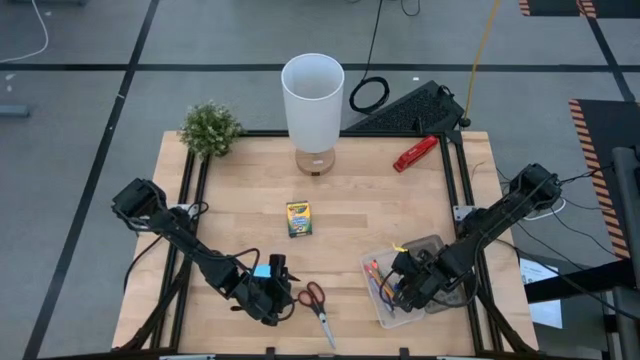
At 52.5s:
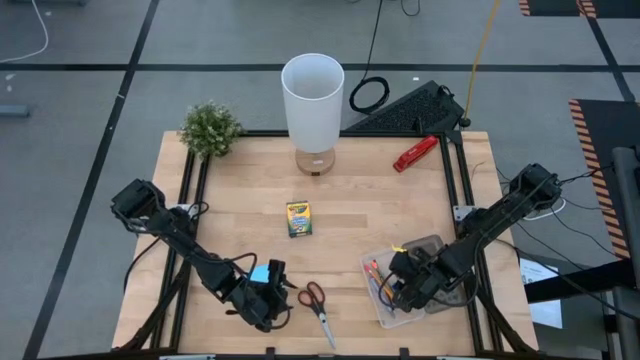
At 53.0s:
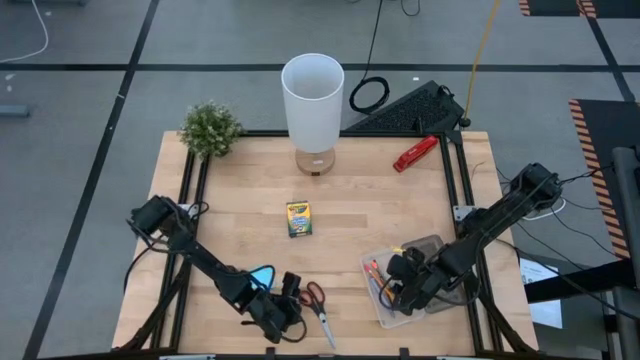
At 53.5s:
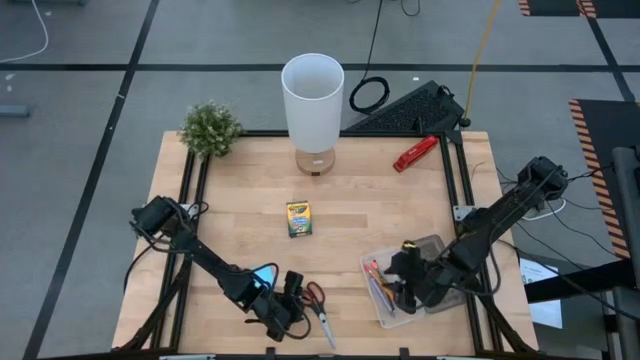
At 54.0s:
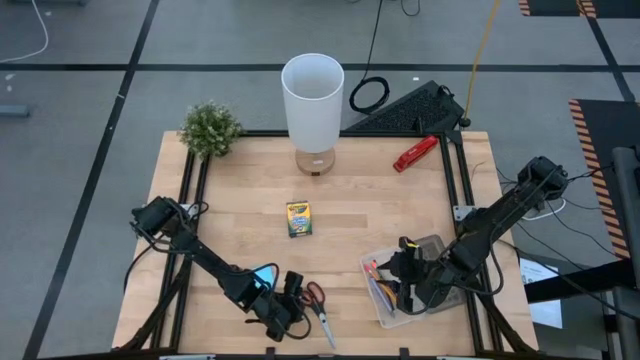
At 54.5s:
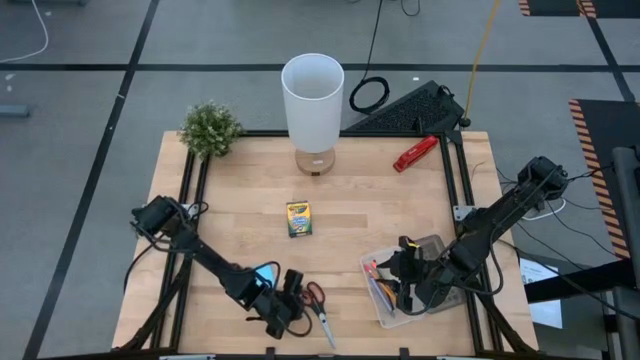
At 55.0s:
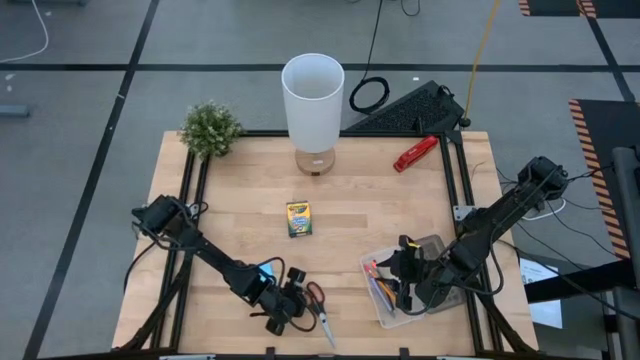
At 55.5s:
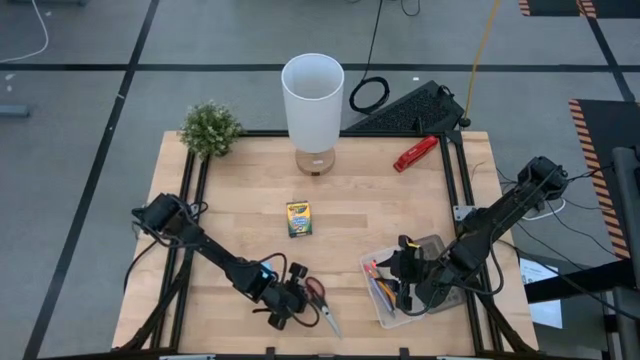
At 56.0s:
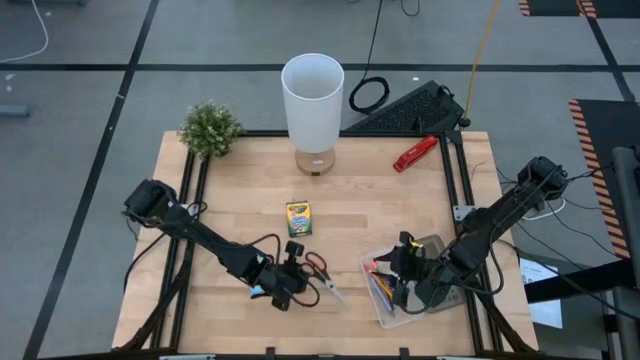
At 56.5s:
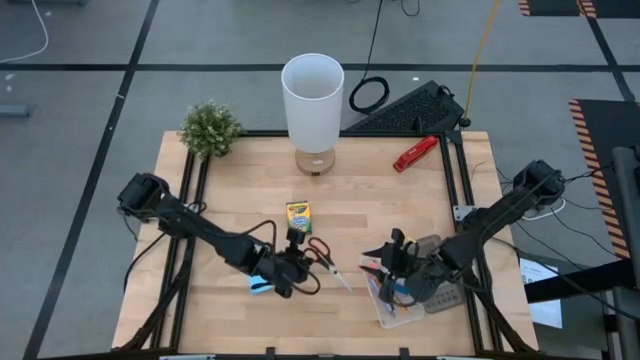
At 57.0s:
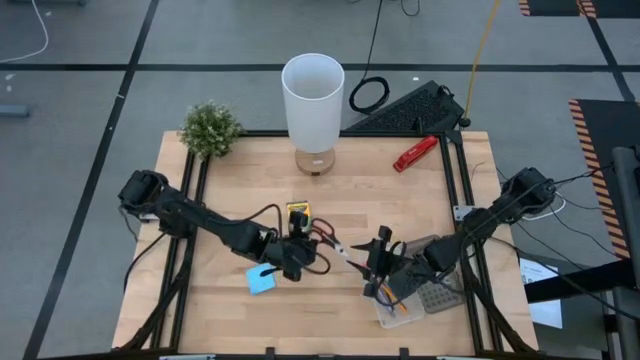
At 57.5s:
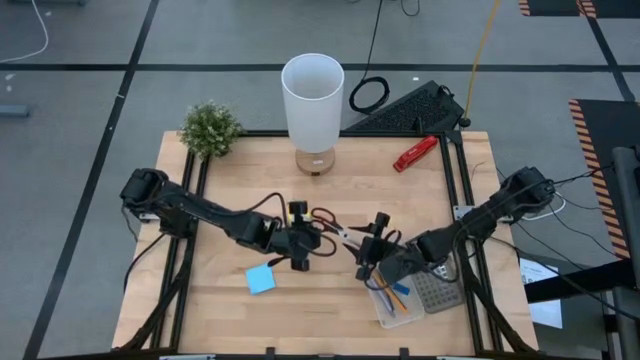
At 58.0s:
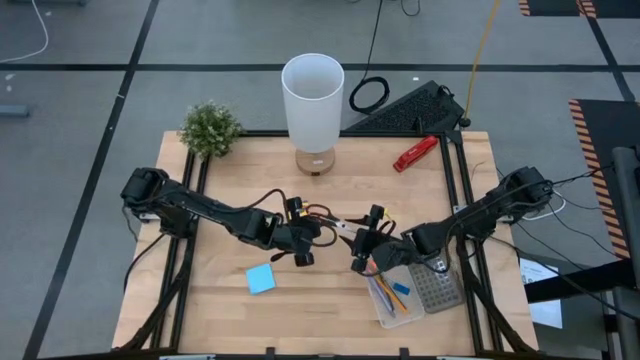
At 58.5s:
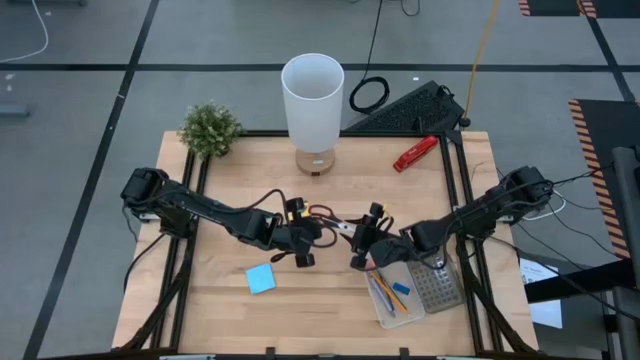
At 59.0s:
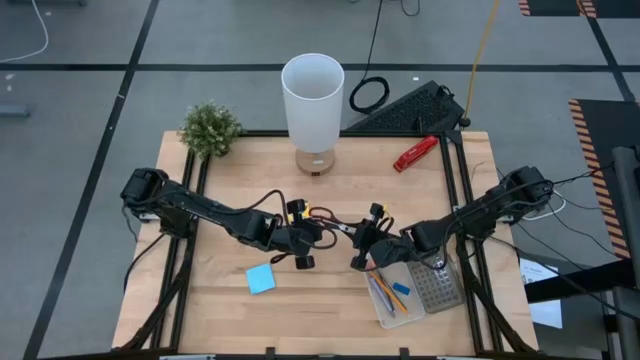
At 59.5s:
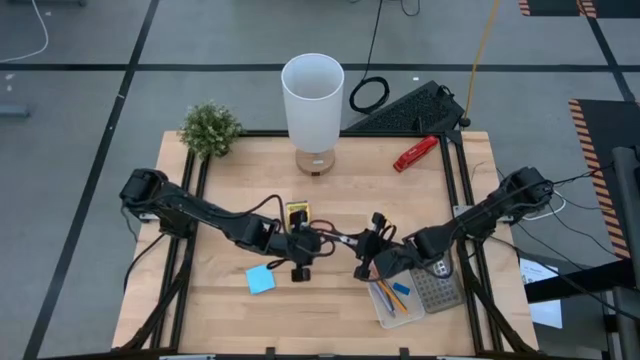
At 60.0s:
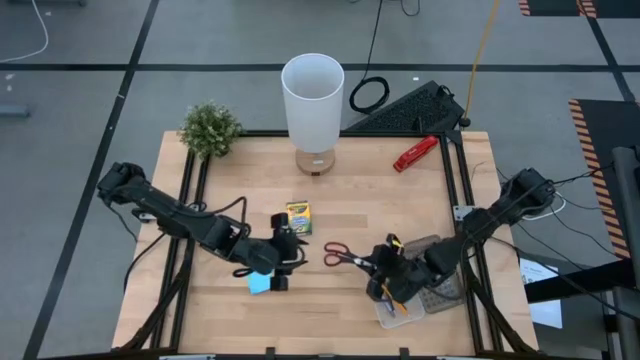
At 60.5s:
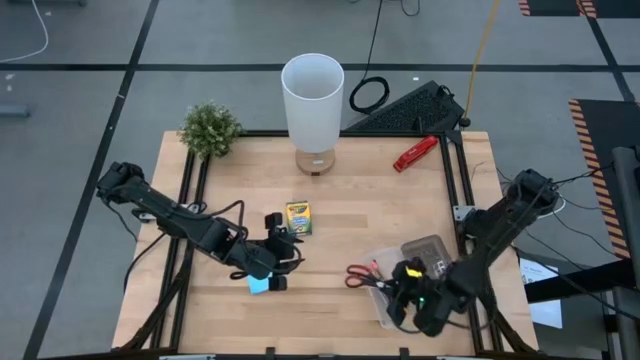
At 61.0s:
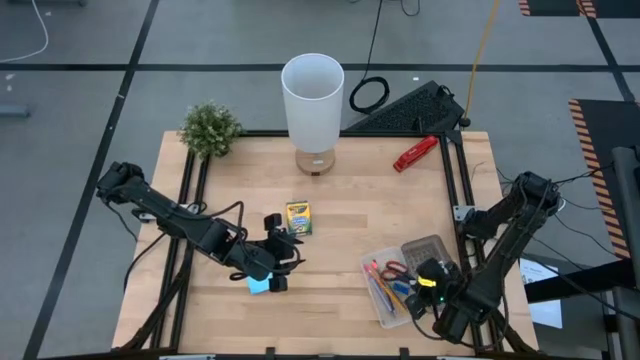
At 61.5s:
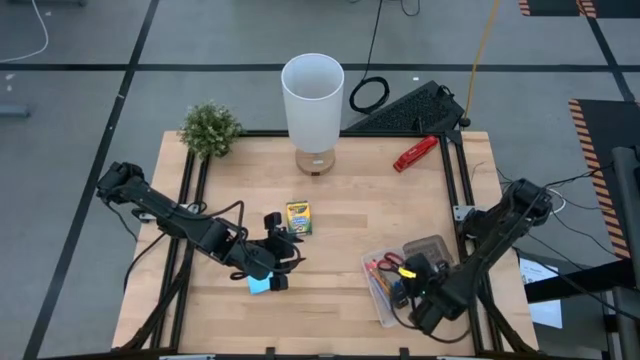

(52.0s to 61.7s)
Task: Pack school essentials
Put the red scissors into the supplies box

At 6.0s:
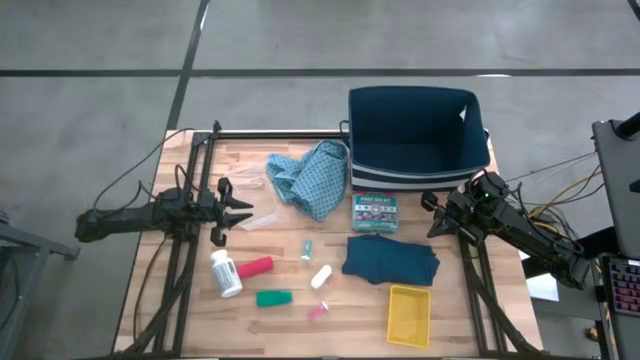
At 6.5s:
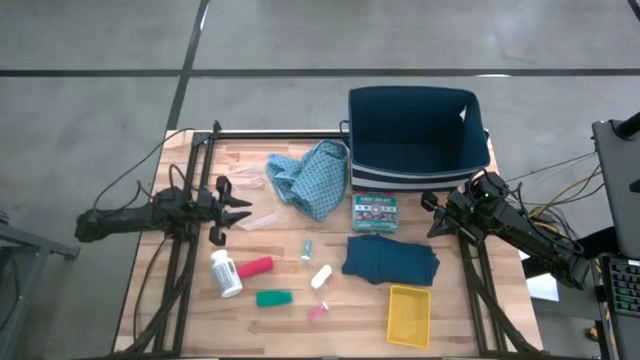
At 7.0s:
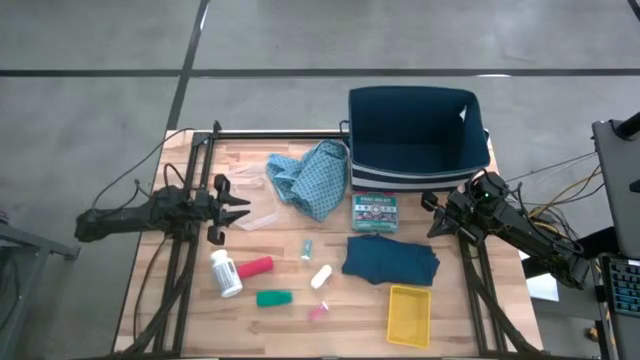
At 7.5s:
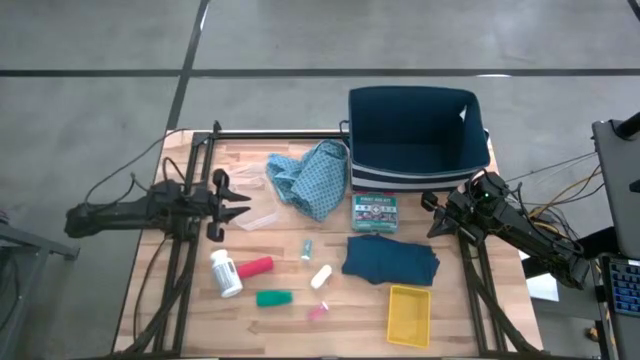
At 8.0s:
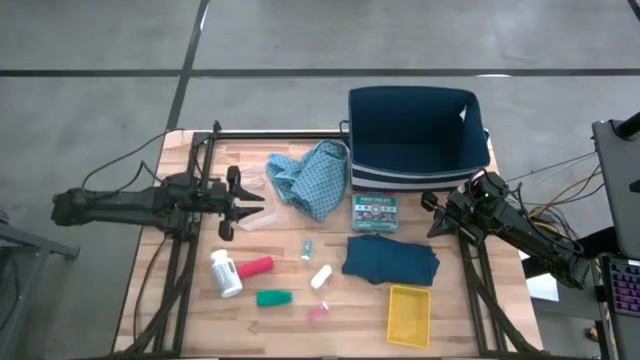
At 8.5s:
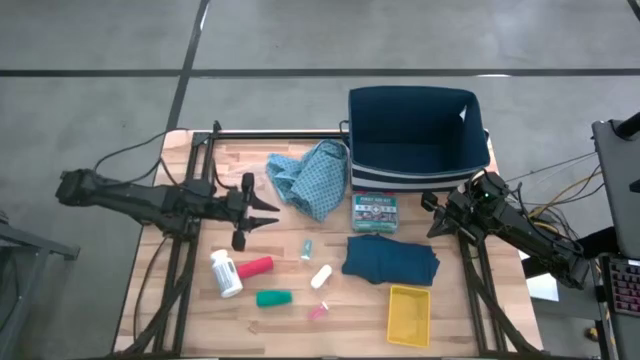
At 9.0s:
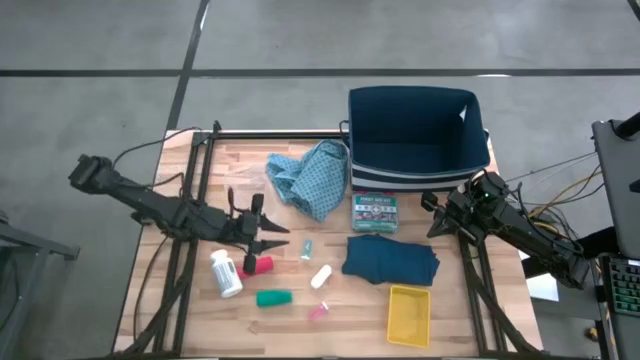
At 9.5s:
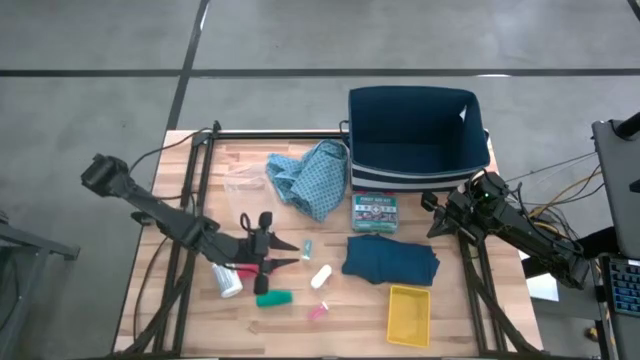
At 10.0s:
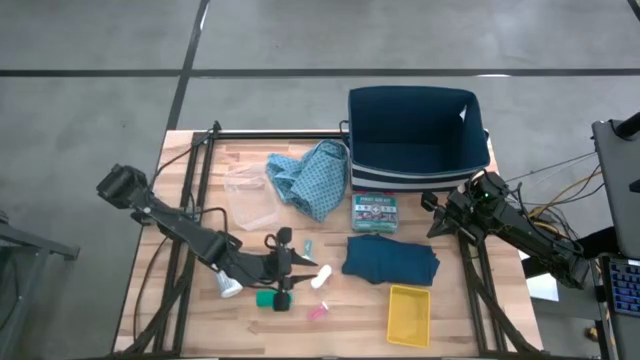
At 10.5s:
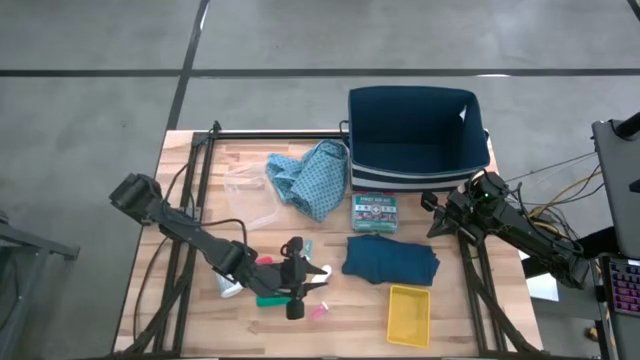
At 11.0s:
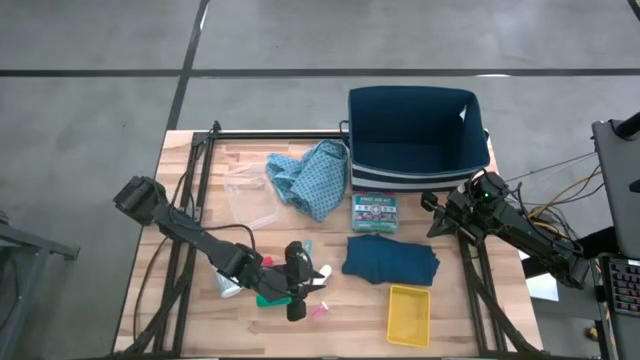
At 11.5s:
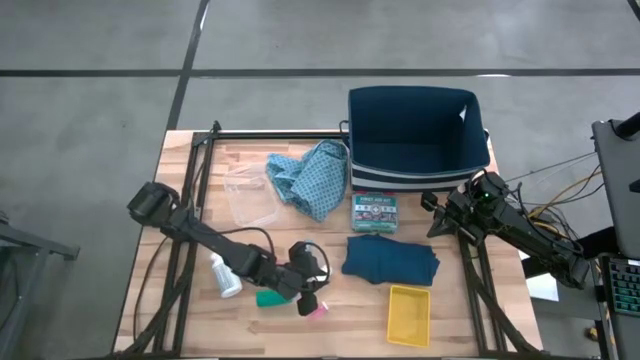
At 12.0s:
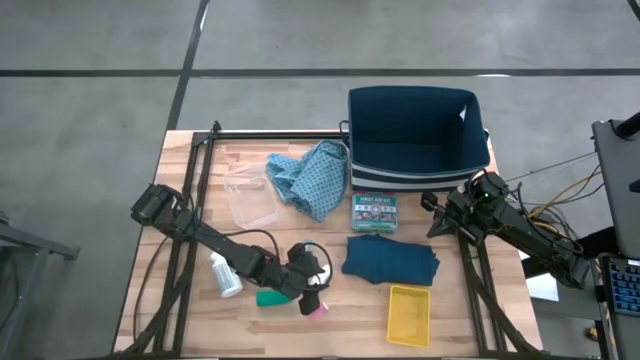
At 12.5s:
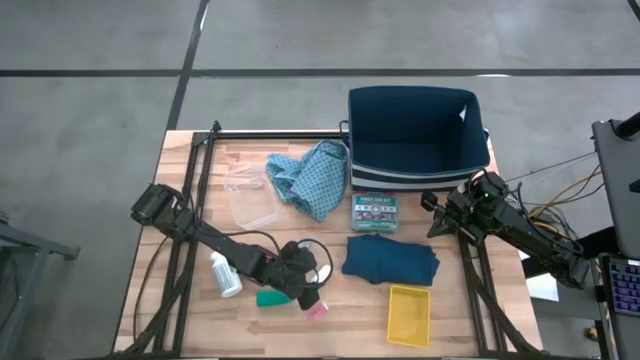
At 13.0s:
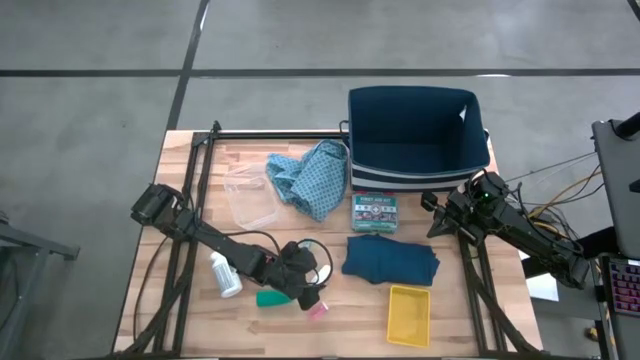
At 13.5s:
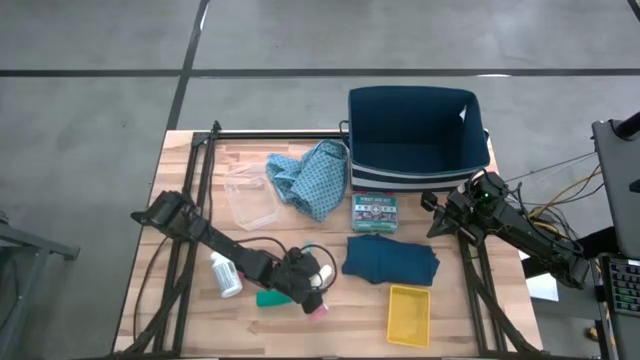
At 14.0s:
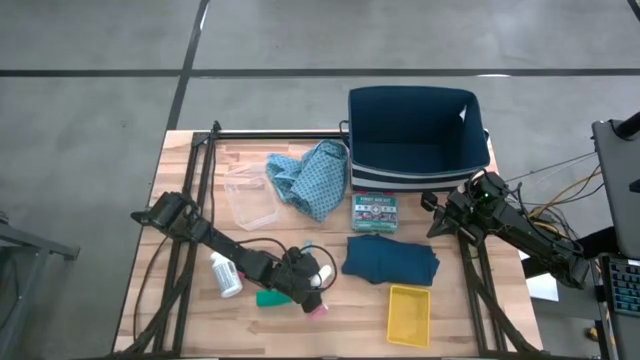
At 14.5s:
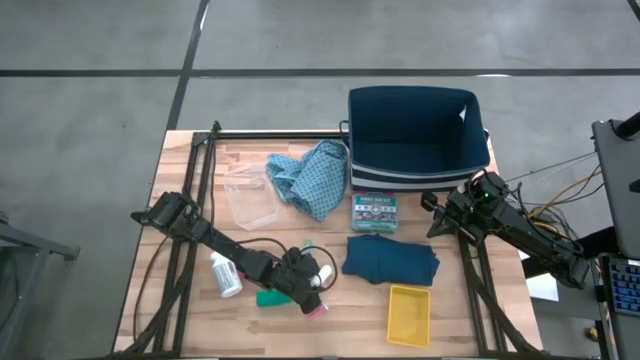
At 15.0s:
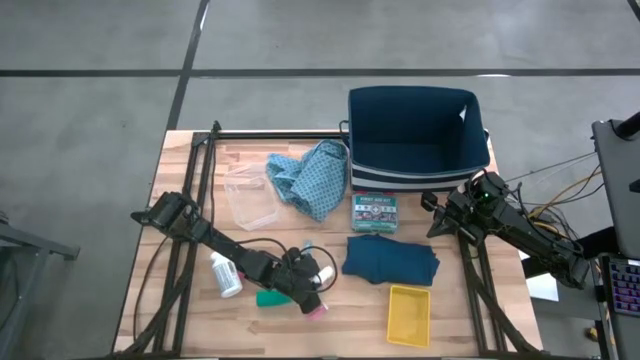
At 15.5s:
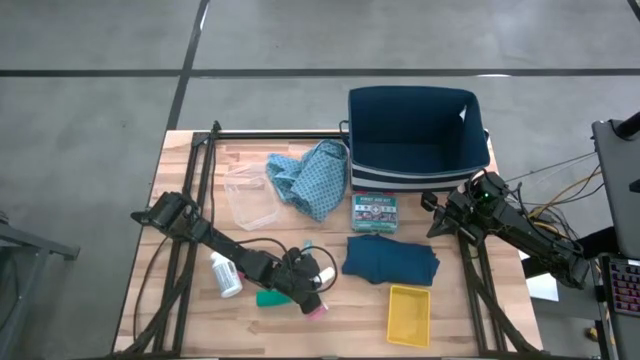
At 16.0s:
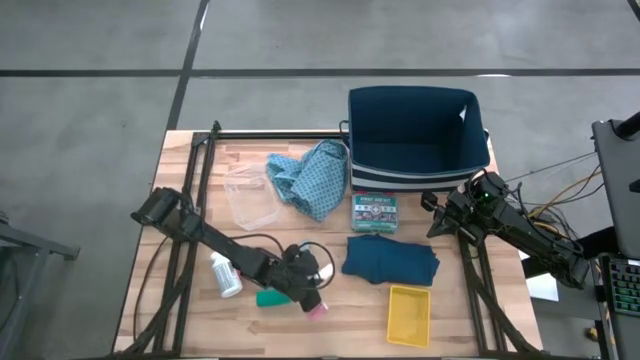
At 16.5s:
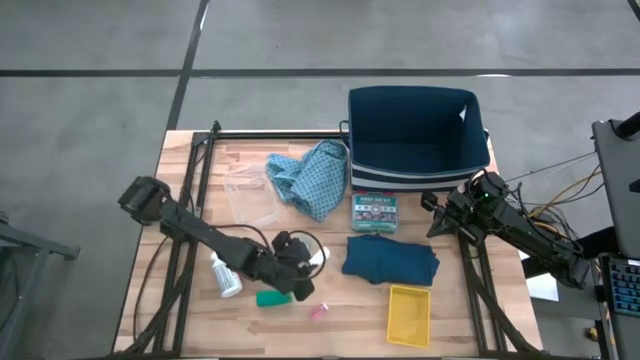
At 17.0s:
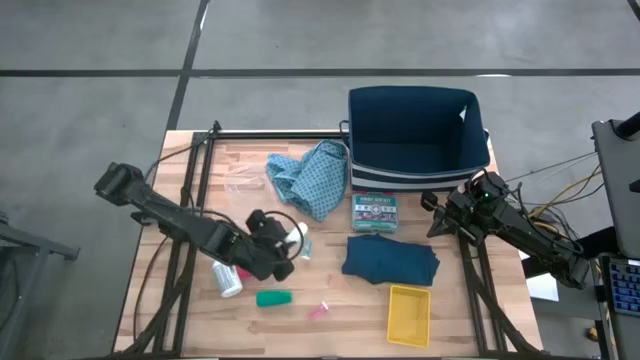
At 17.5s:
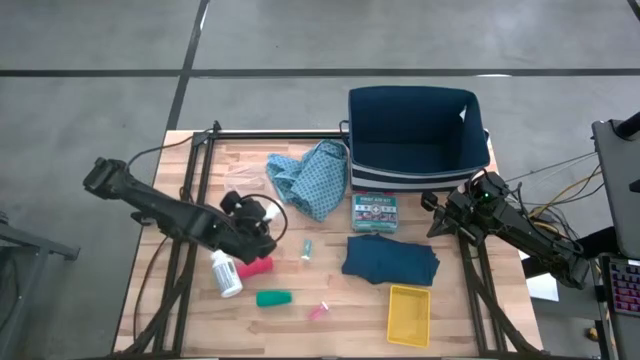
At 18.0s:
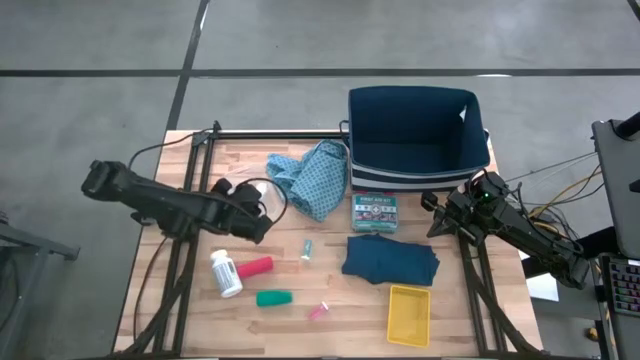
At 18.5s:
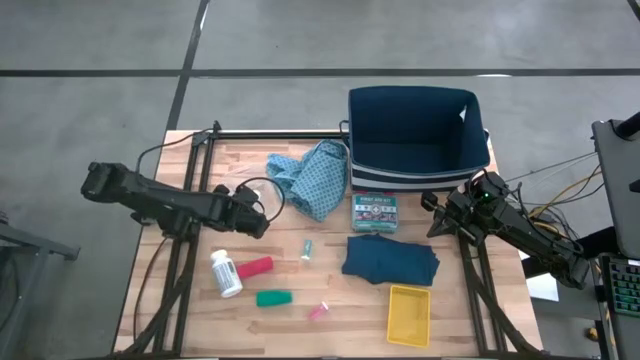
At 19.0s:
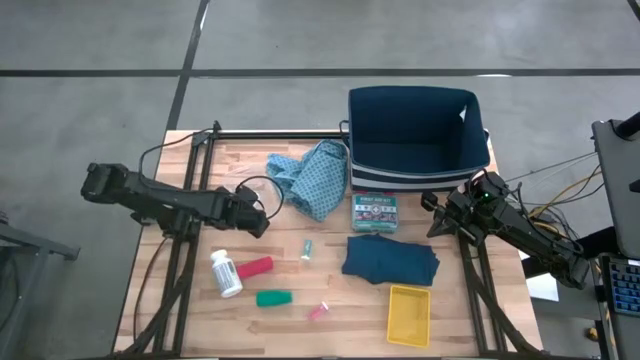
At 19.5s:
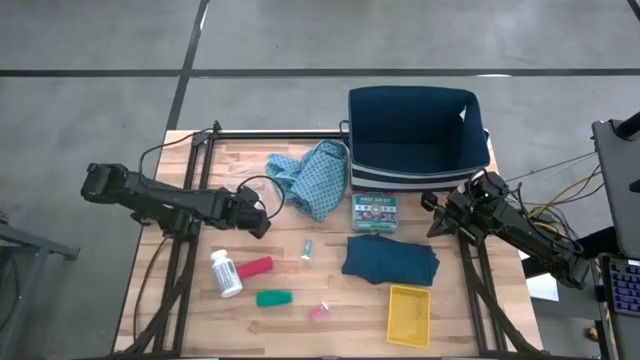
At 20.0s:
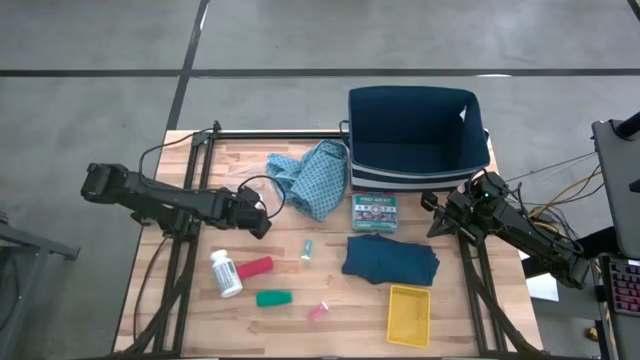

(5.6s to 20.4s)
Task: Pick & place medical supplies in basket/bin
Put the white rolled gauze into the transparent bin
